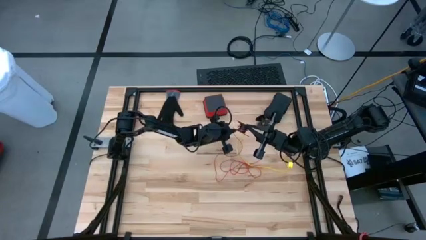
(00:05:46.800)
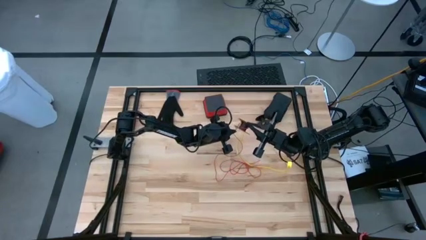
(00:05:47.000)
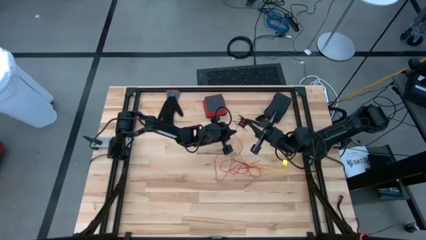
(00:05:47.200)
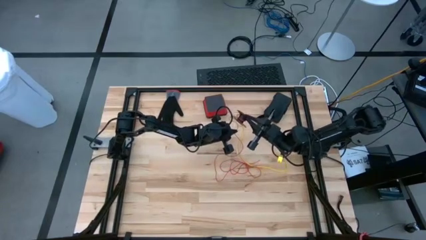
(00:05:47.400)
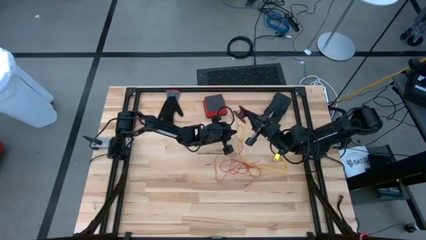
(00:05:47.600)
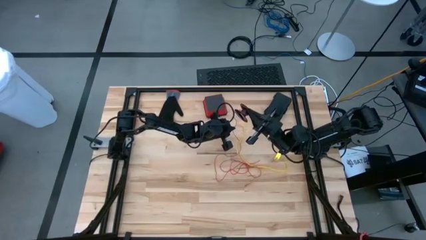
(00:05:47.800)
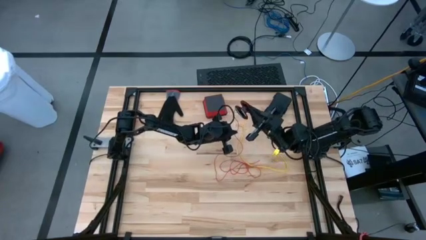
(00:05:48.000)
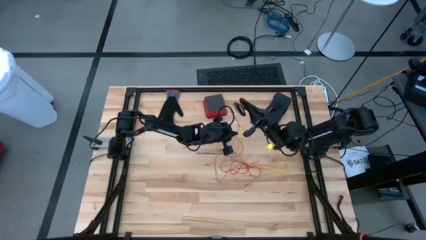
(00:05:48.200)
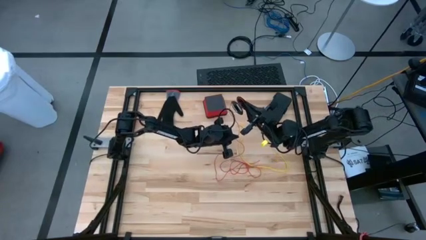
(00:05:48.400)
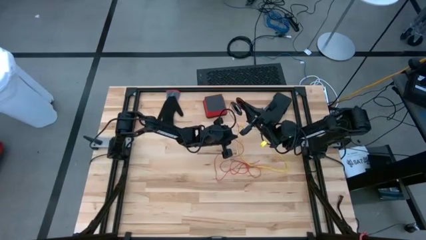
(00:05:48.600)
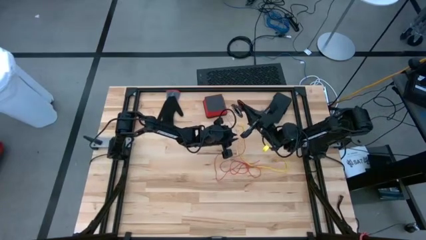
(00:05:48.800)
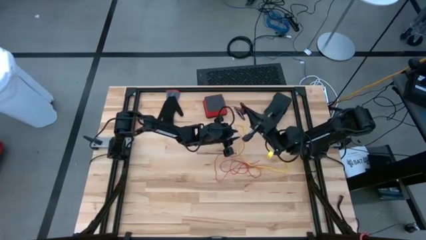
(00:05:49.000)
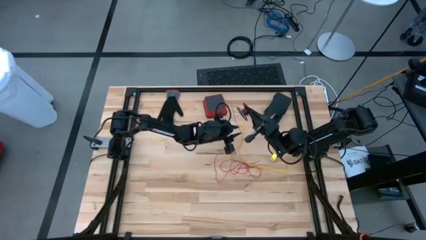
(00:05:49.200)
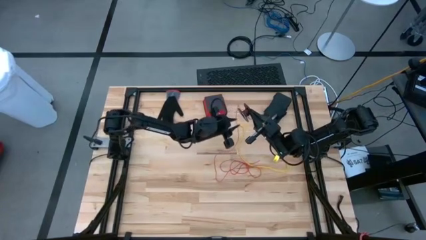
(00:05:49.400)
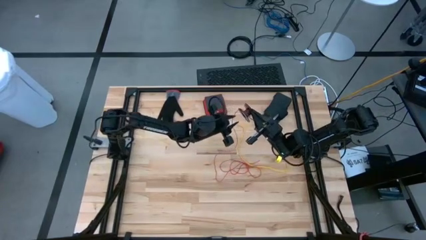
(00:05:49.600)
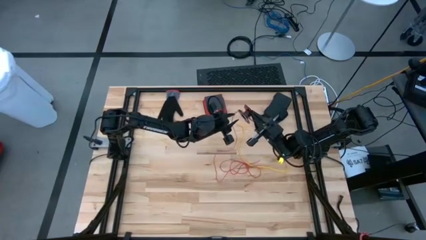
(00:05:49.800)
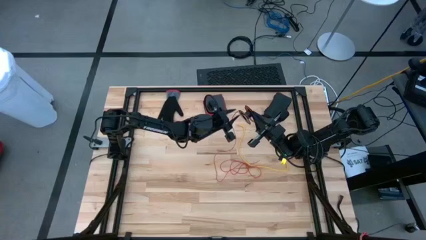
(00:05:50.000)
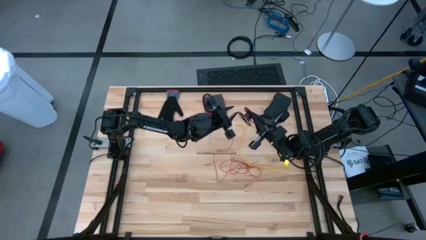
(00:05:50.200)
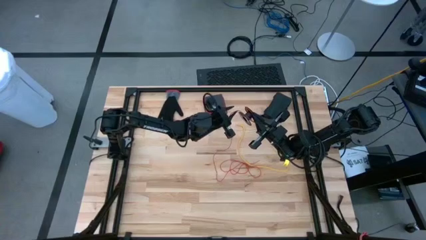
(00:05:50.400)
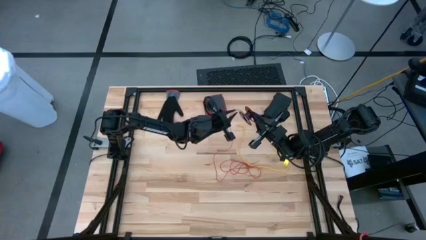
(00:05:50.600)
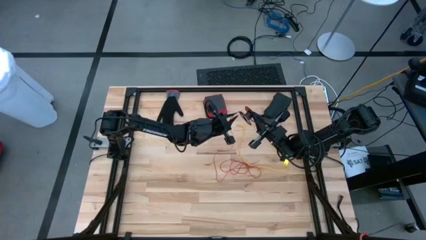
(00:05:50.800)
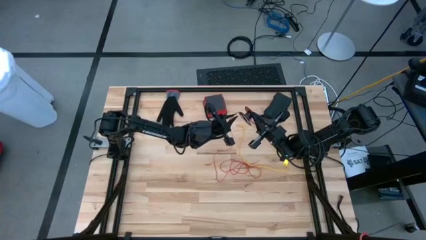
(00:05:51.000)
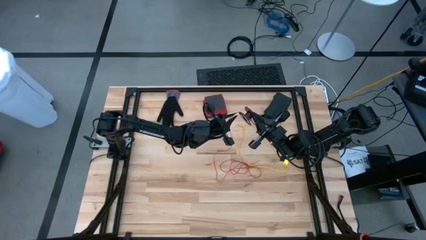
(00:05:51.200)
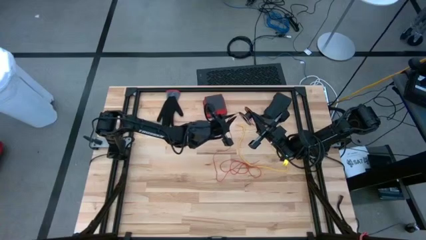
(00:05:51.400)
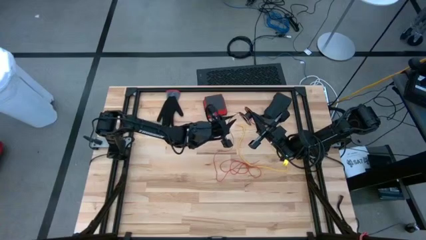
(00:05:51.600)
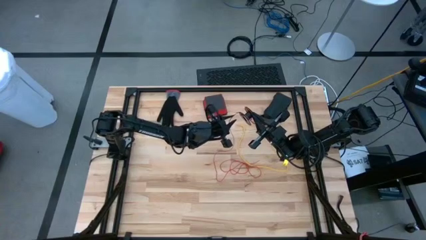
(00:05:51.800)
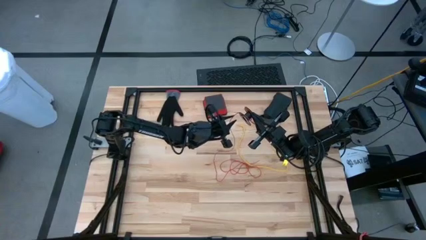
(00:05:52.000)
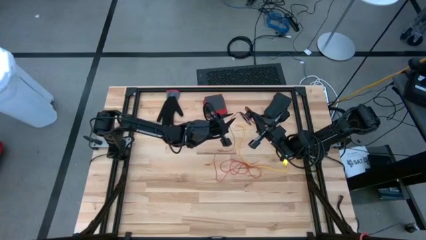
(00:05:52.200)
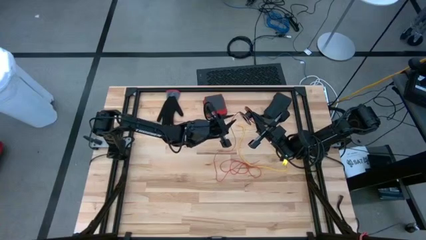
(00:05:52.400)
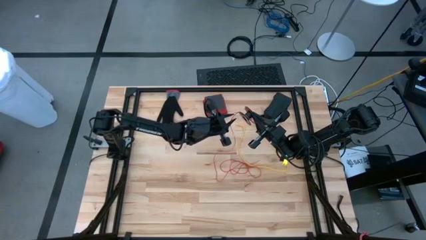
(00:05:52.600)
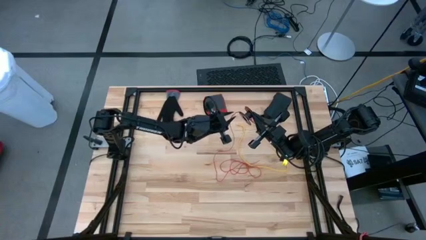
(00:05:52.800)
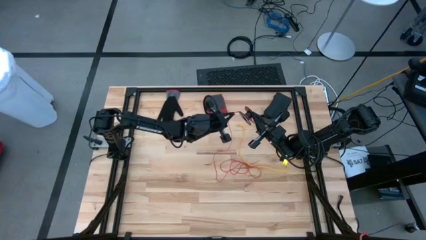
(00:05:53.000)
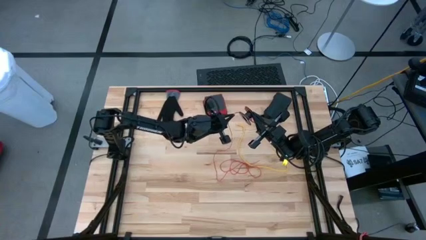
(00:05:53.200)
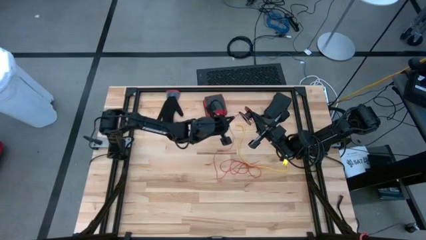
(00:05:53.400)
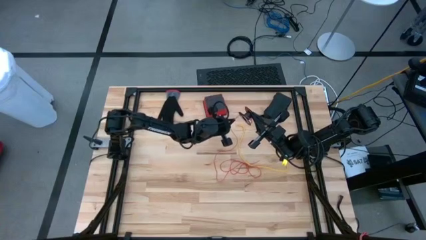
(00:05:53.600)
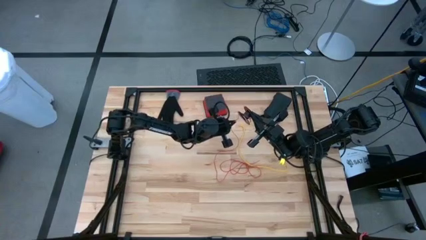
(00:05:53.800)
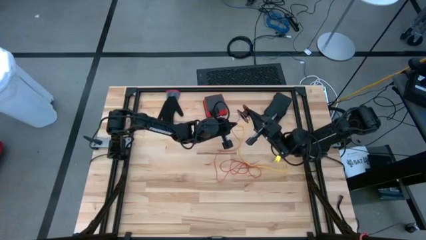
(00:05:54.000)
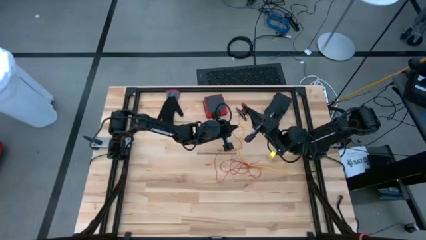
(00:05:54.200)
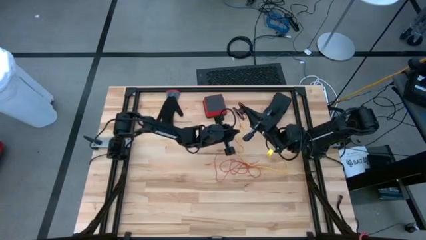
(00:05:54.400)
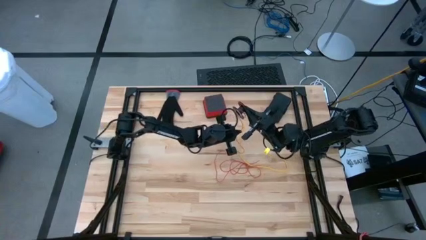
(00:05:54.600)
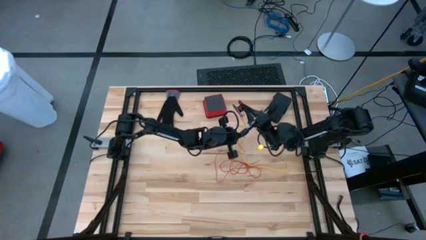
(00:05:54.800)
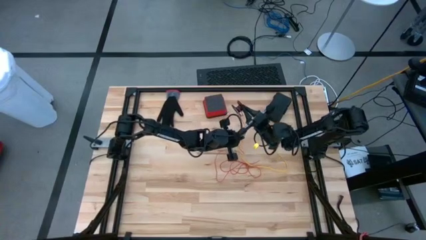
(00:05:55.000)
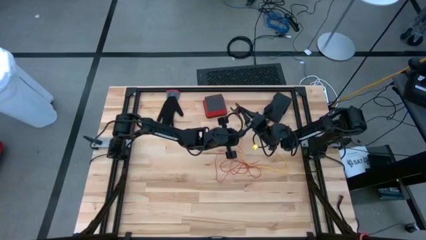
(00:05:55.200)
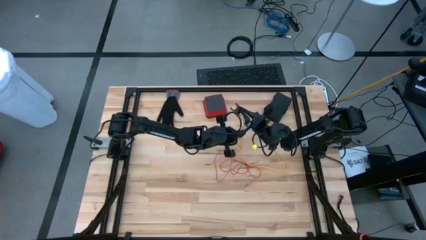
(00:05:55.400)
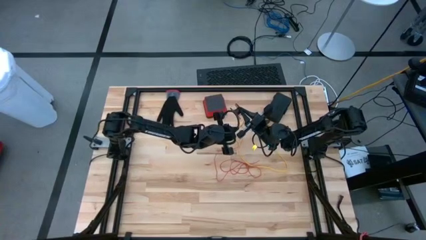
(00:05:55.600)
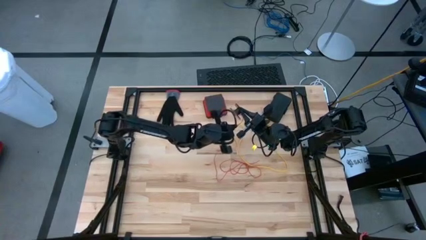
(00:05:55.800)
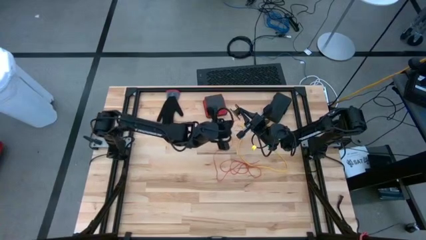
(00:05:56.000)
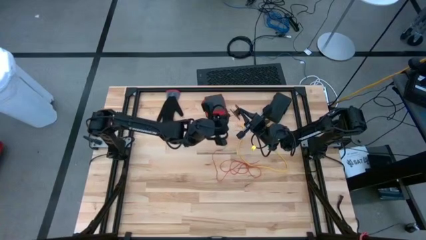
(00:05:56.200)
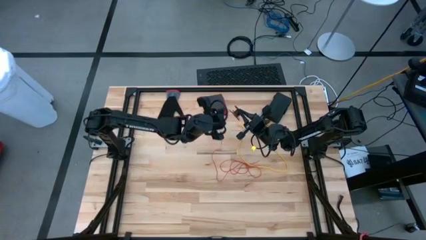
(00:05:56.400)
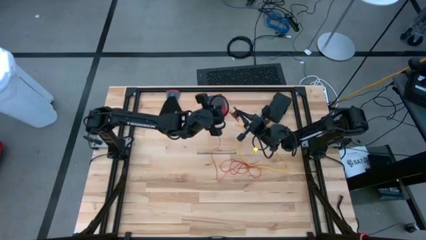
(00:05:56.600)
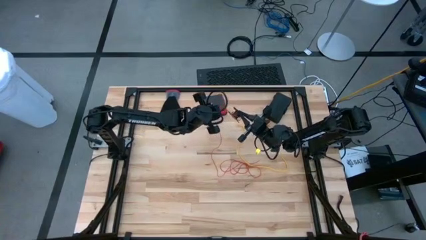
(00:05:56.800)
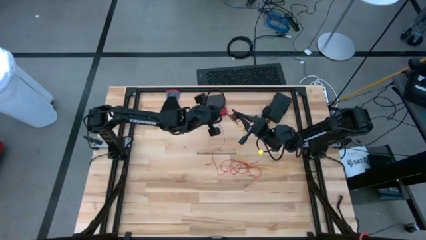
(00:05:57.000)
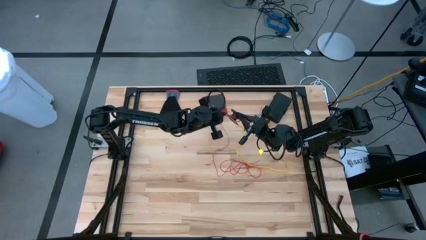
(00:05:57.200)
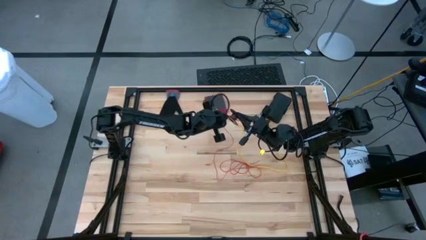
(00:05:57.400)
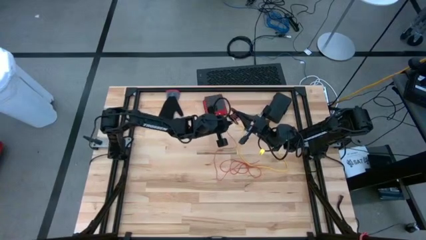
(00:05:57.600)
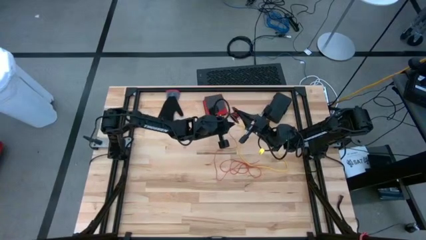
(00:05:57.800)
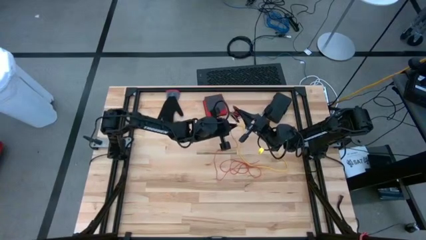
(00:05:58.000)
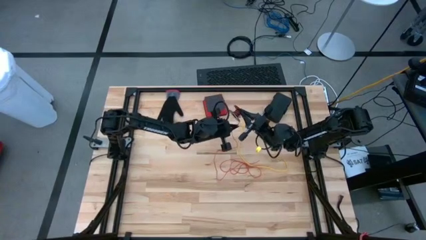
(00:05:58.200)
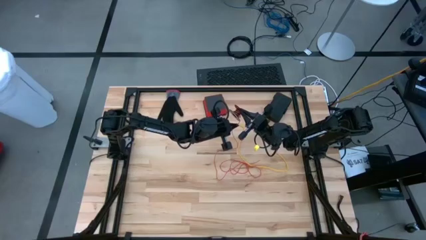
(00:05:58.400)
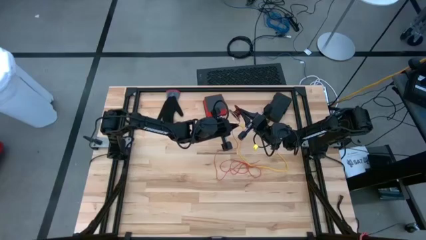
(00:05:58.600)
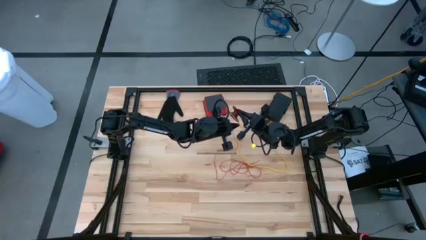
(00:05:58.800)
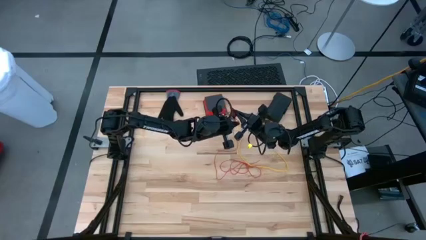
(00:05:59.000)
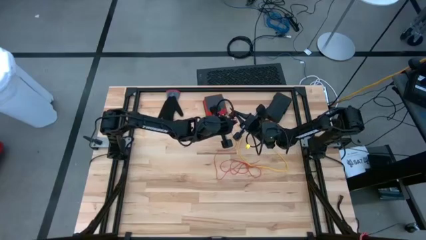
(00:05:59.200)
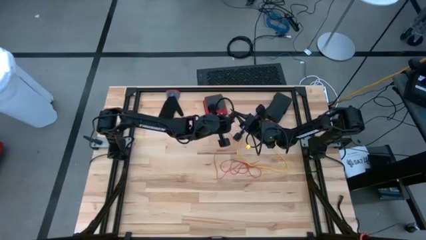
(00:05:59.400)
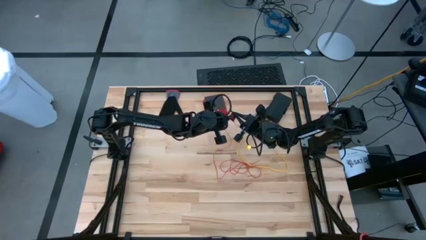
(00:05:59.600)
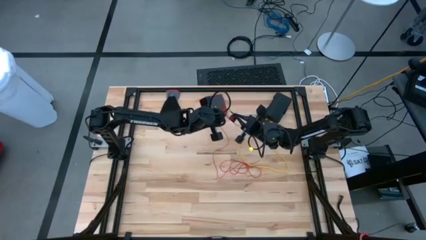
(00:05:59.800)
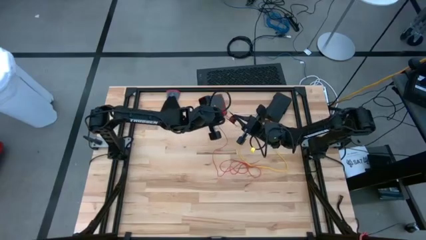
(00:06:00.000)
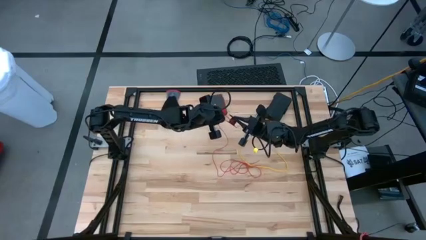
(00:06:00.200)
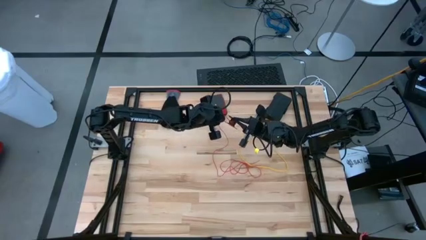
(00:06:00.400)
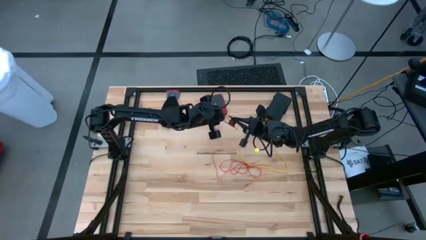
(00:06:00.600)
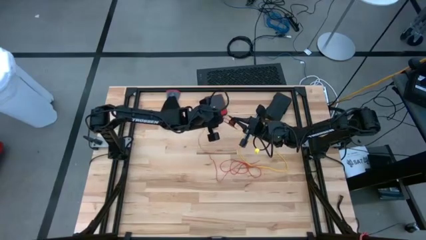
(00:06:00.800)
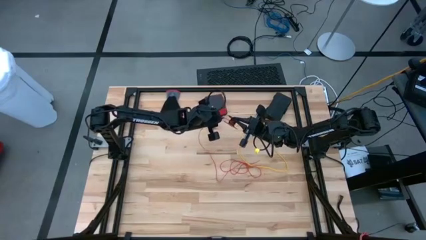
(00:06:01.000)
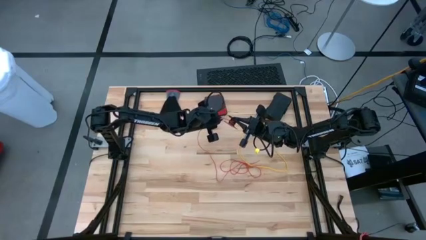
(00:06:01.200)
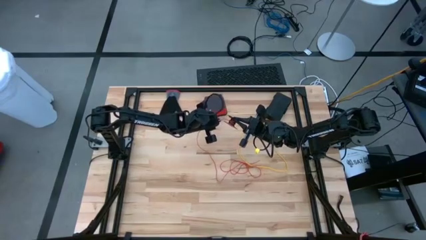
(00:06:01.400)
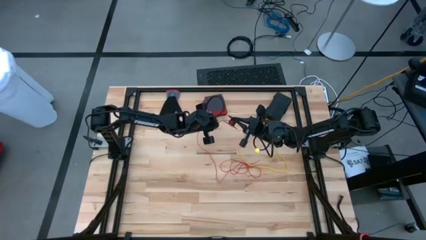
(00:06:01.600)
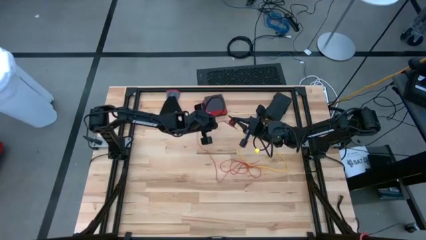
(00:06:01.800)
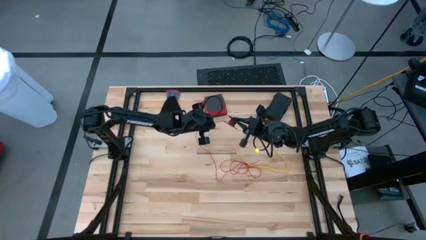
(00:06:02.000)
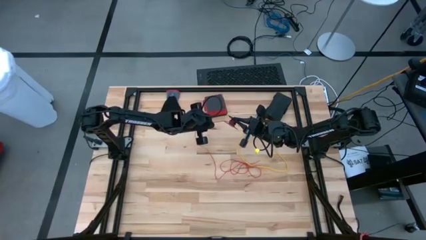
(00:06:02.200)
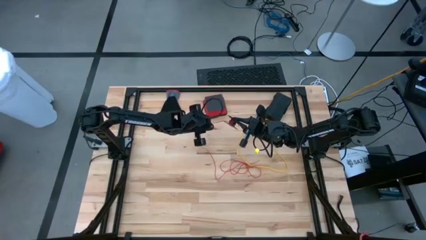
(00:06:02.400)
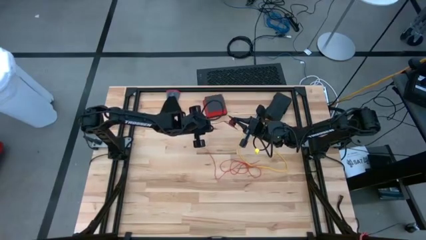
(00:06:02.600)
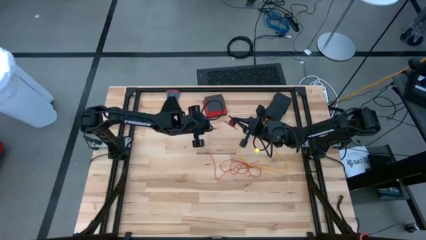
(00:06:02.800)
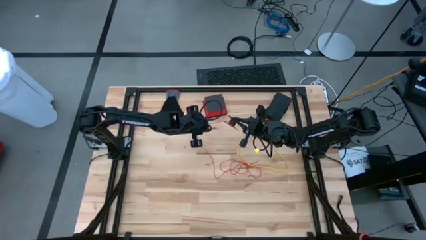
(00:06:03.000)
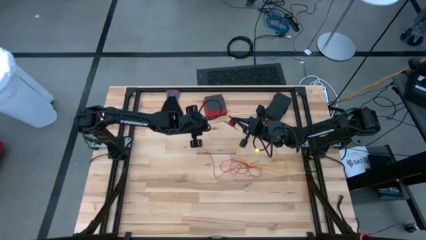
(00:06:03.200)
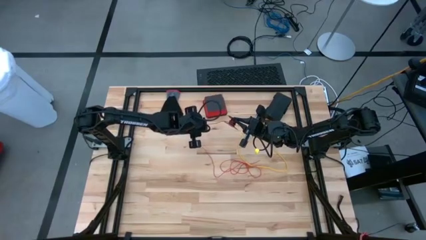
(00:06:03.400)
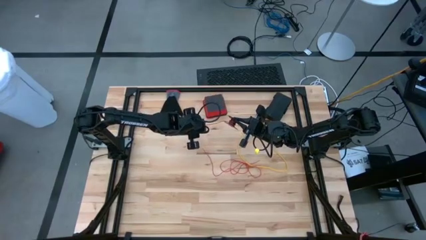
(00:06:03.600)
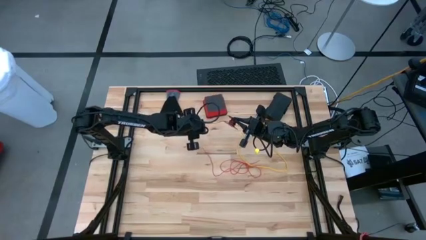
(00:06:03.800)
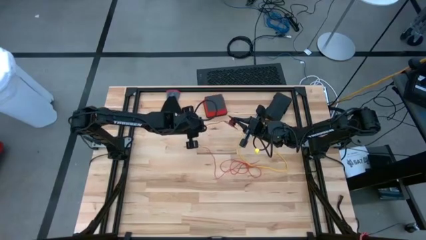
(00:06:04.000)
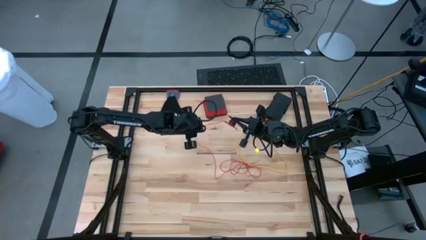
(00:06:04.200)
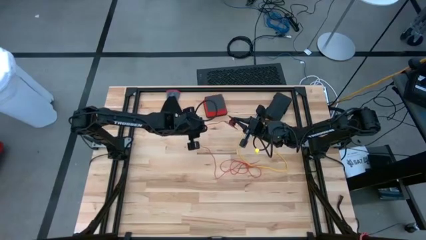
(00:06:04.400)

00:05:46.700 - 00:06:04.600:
Task: Coil cords
Coil the red wire onto the spool
